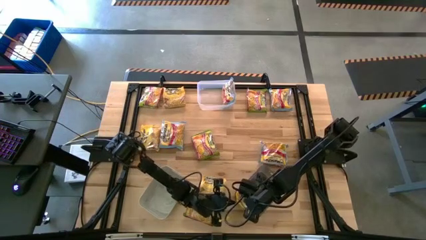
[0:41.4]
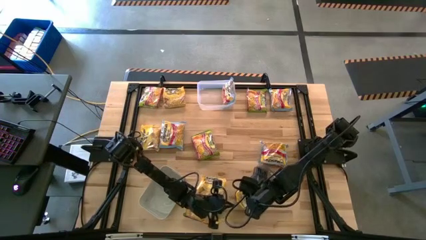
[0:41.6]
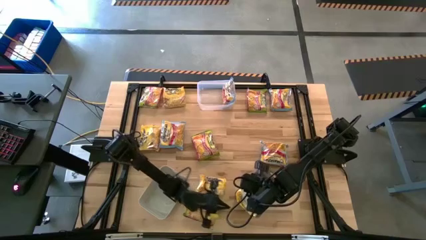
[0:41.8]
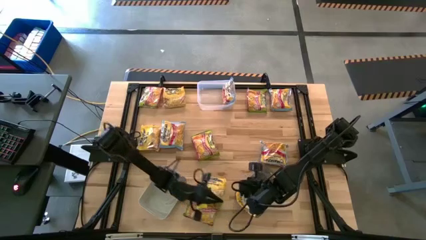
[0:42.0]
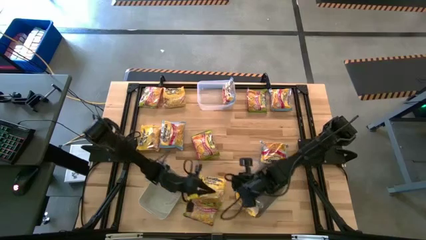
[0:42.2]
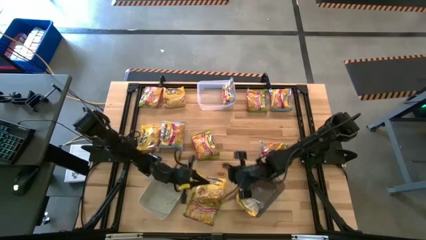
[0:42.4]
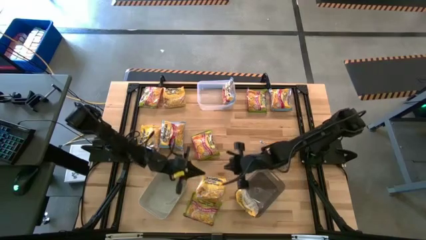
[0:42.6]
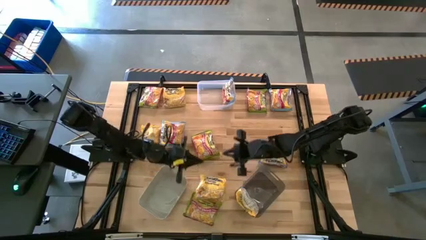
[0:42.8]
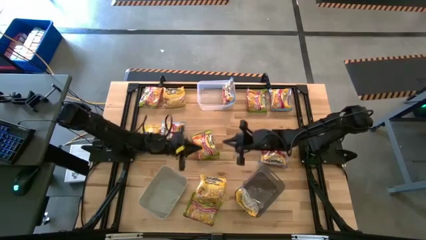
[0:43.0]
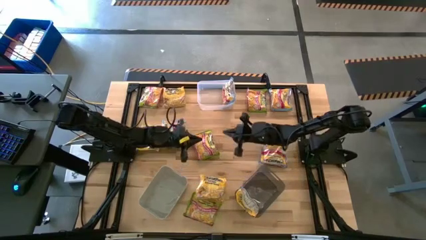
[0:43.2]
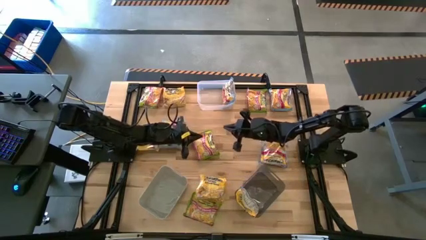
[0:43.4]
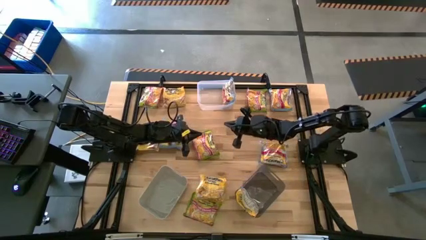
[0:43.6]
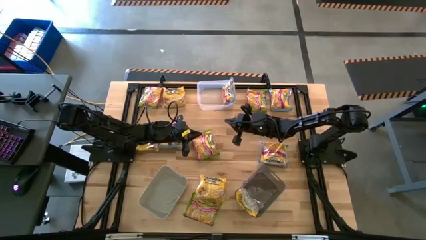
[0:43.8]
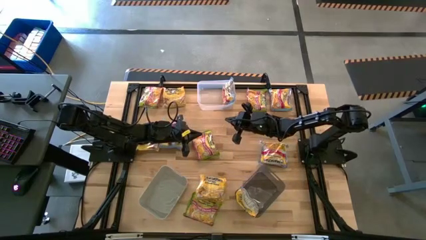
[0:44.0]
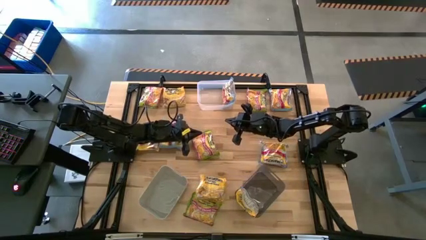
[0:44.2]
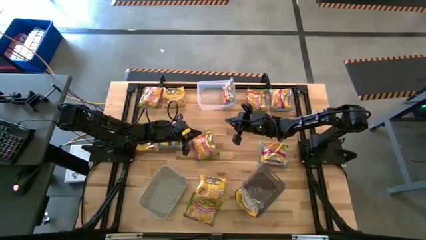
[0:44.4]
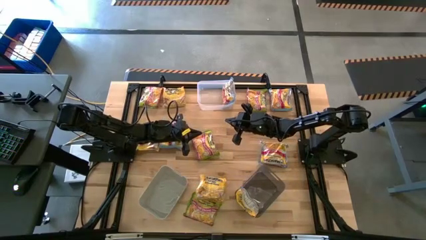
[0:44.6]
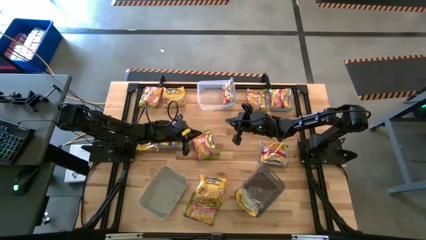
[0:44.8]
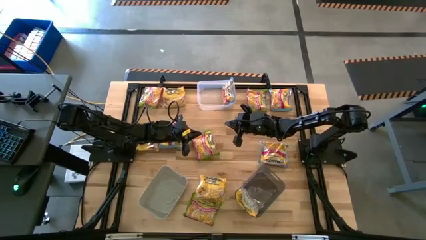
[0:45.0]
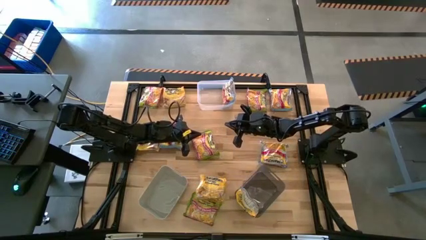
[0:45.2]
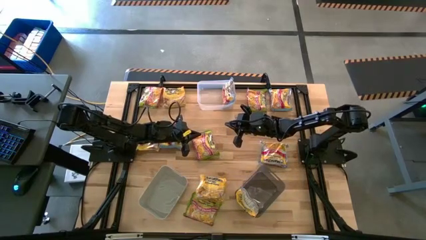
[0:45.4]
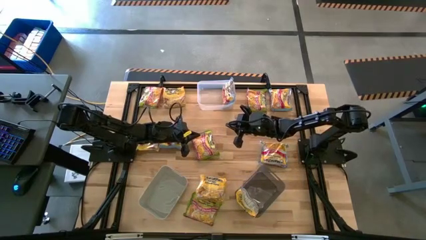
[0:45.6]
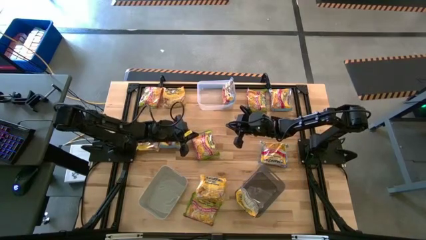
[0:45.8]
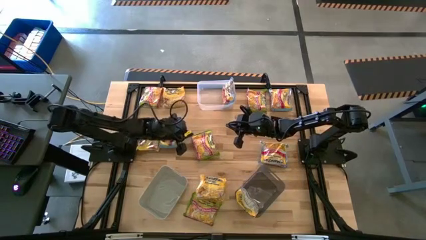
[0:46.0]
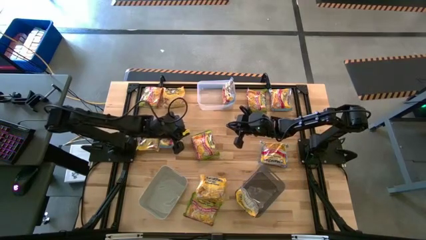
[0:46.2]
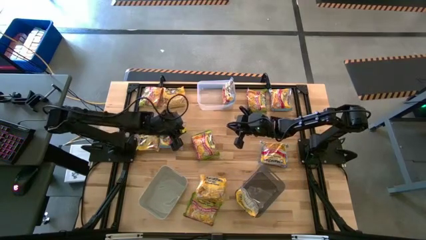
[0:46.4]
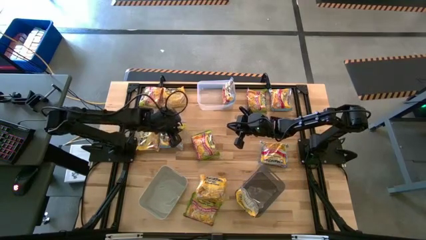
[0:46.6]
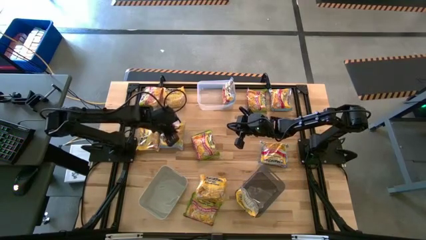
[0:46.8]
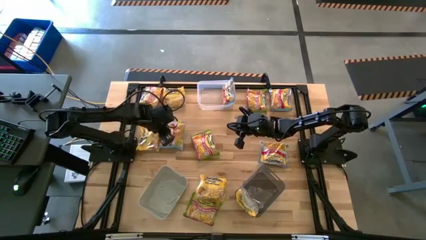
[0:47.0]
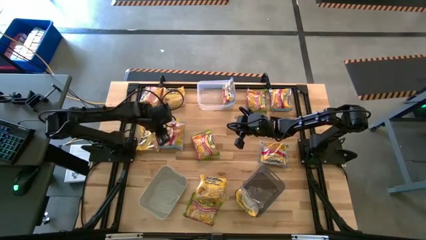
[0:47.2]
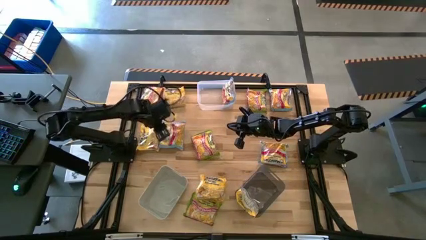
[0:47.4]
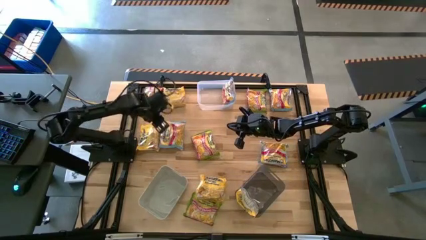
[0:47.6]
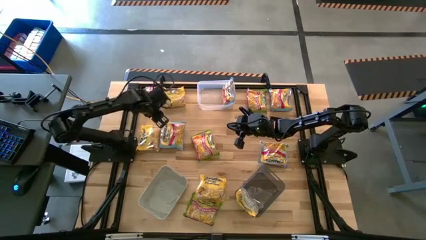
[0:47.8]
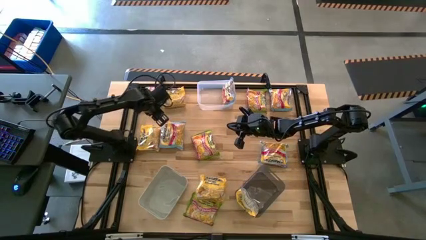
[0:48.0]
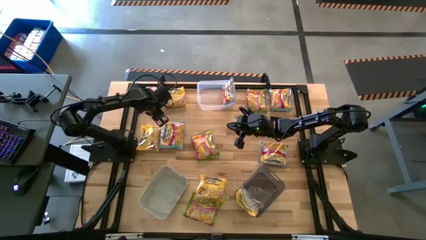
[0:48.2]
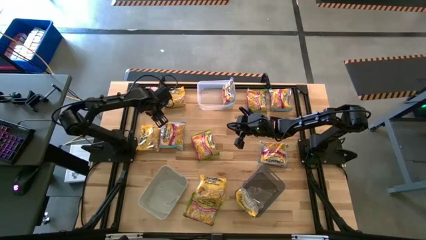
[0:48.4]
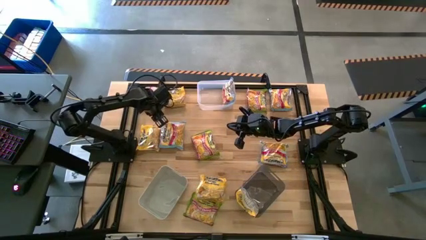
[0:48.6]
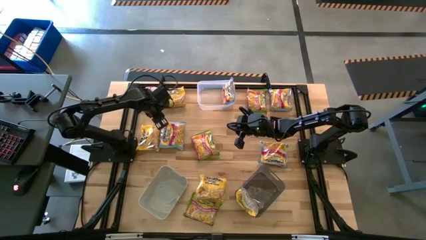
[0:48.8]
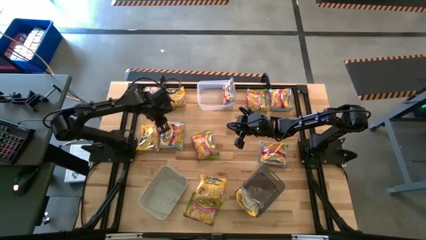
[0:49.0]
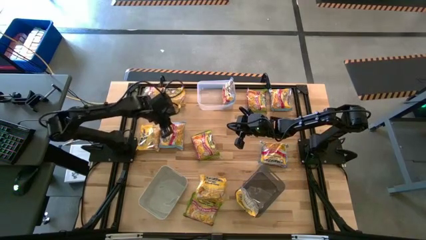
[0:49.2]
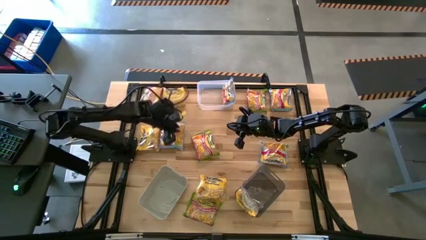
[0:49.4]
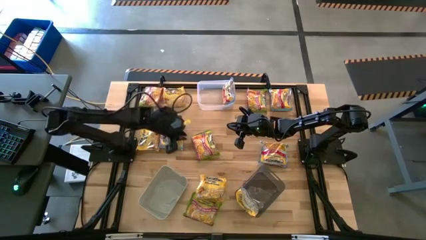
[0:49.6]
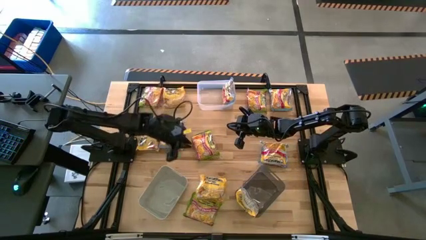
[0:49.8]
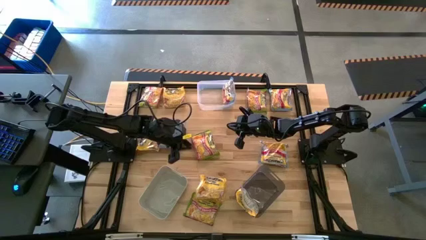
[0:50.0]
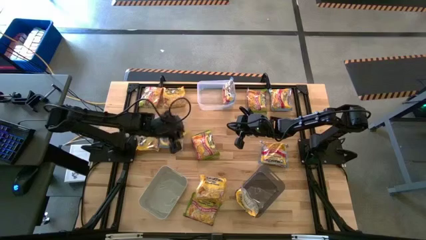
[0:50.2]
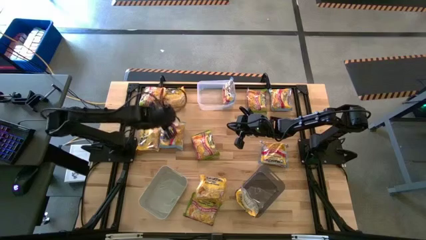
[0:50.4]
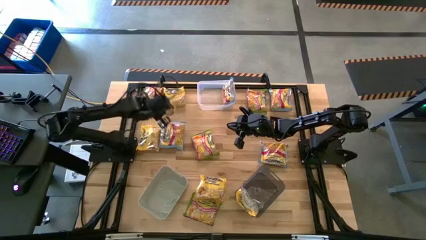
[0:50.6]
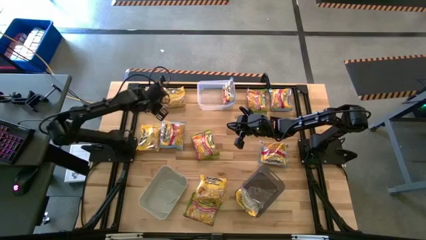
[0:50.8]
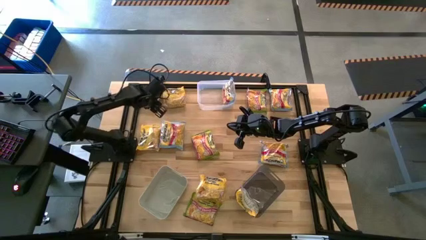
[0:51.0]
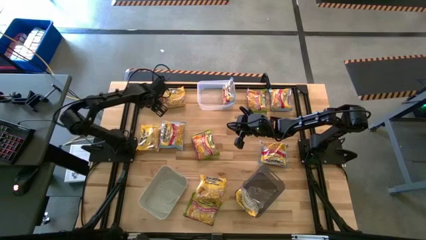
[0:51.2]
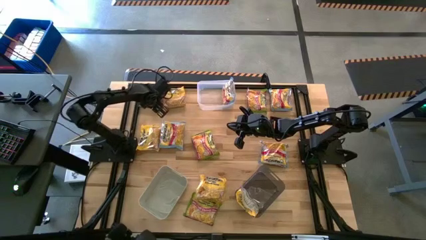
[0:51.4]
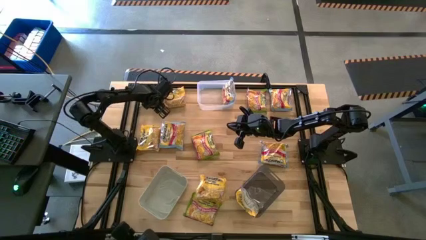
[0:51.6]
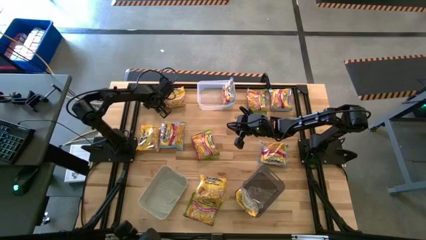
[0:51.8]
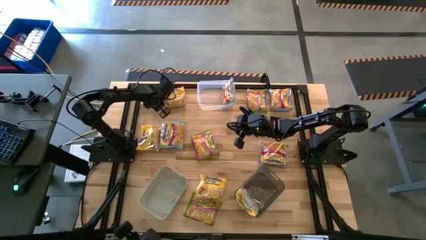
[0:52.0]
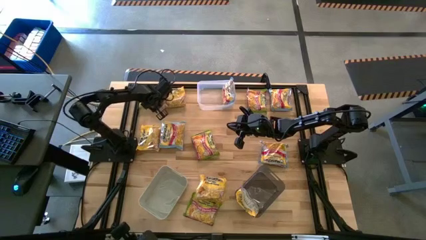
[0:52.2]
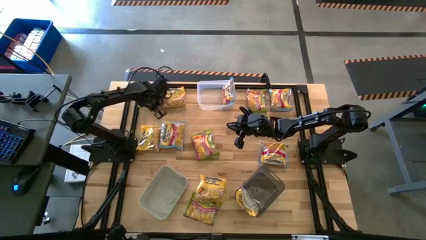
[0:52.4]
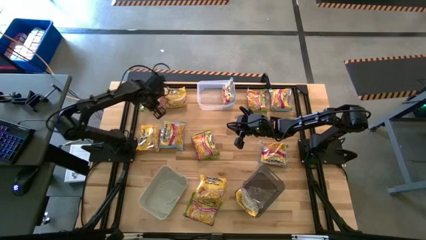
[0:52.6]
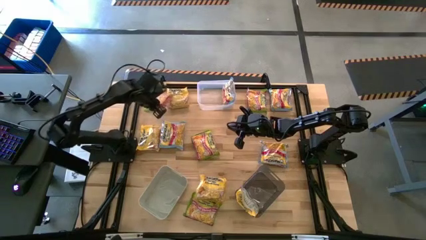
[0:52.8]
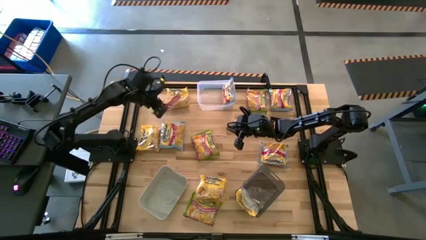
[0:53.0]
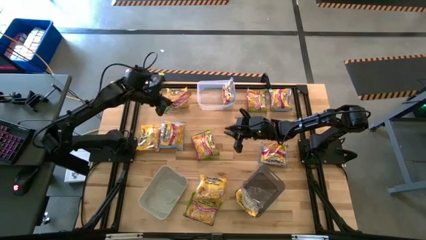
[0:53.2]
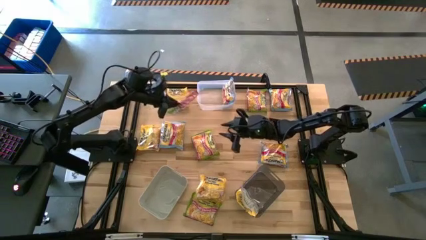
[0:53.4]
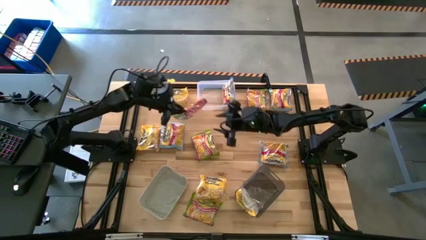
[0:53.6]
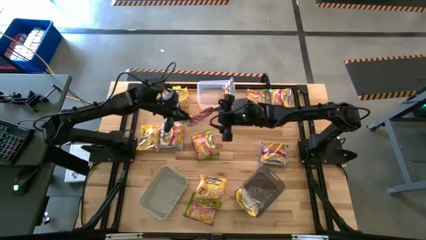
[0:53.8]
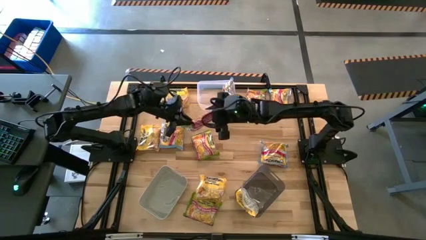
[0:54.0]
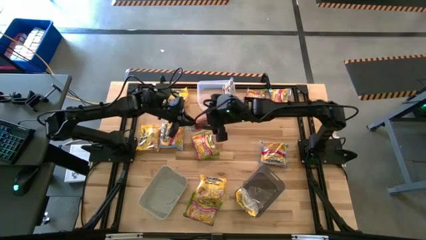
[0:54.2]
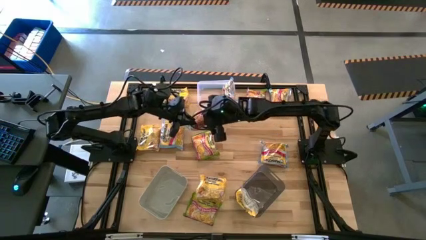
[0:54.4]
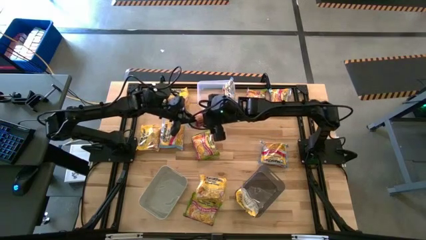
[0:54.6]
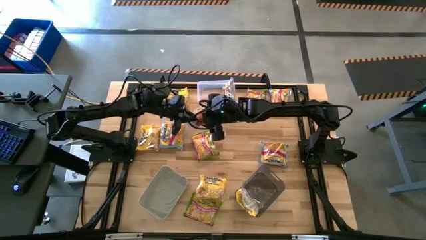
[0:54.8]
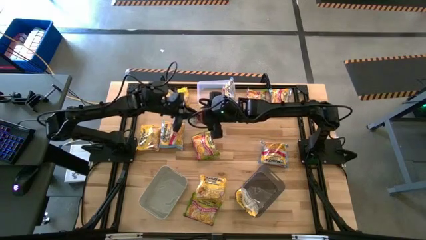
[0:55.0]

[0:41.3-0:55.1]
Task: Sort Maruchan noodles
Put the green noodle pack into the gray bin

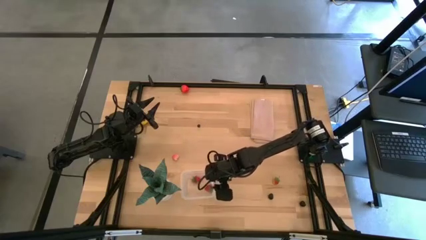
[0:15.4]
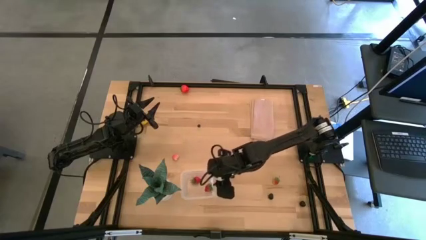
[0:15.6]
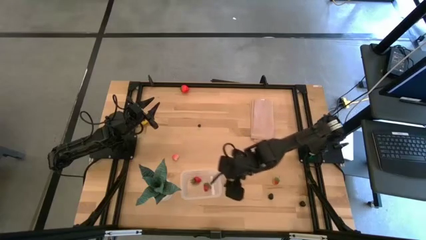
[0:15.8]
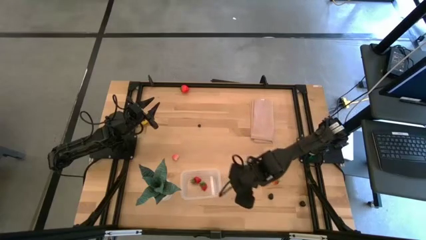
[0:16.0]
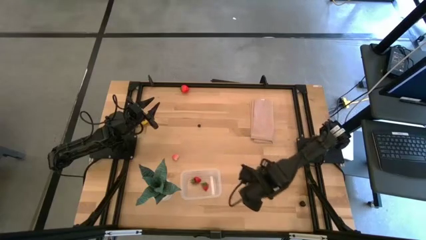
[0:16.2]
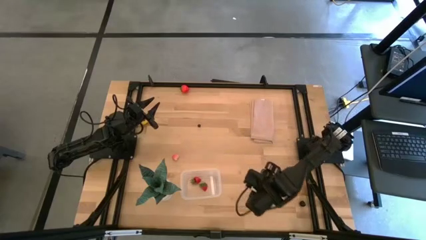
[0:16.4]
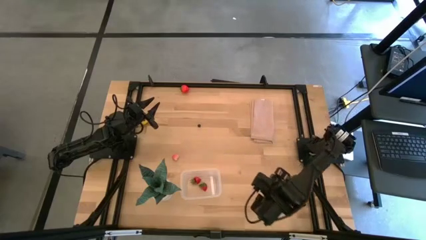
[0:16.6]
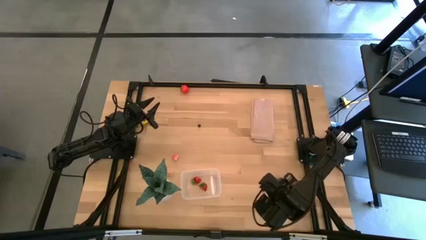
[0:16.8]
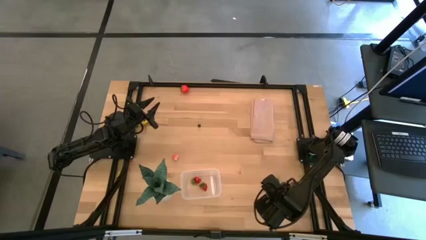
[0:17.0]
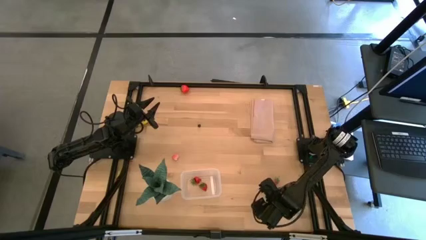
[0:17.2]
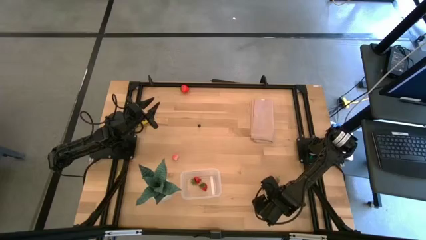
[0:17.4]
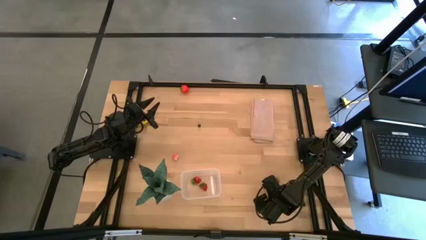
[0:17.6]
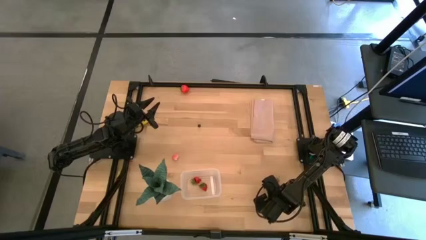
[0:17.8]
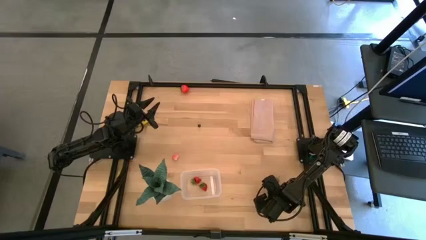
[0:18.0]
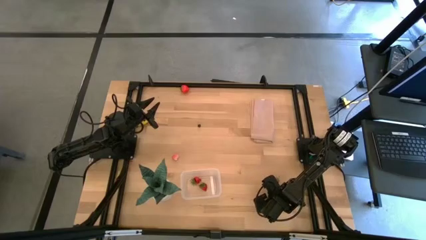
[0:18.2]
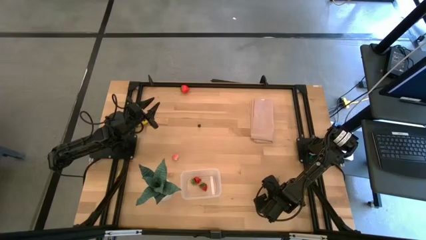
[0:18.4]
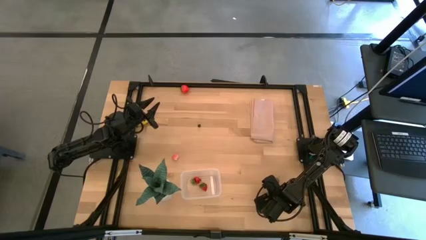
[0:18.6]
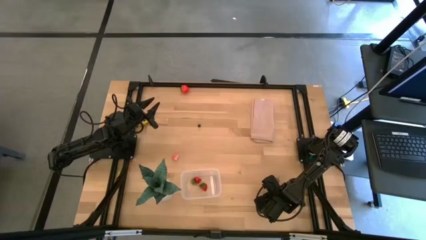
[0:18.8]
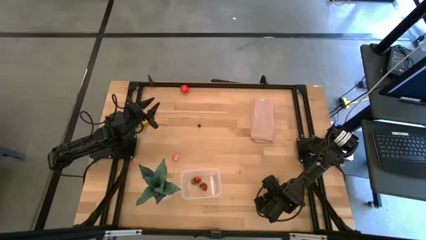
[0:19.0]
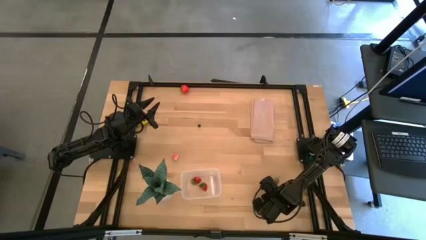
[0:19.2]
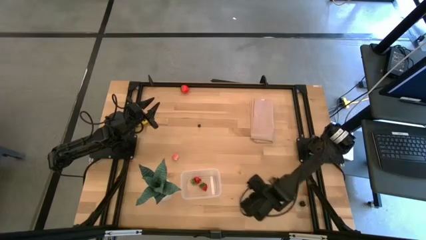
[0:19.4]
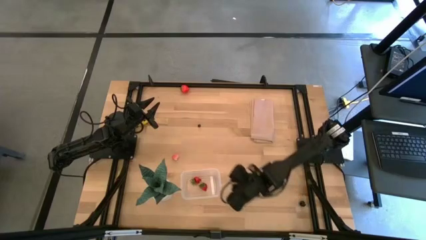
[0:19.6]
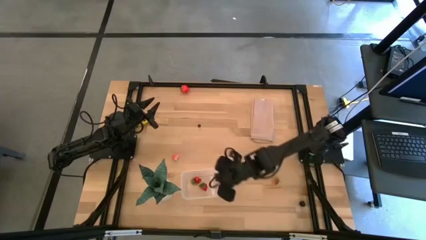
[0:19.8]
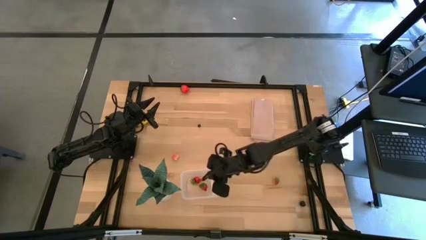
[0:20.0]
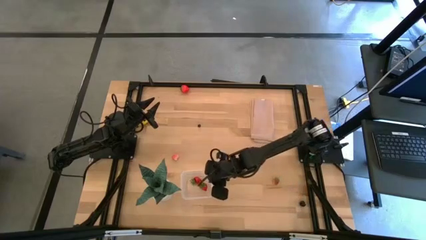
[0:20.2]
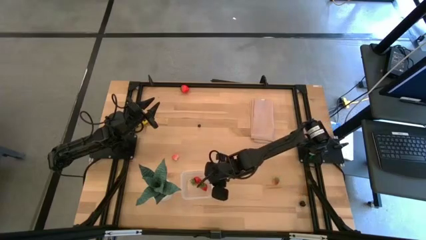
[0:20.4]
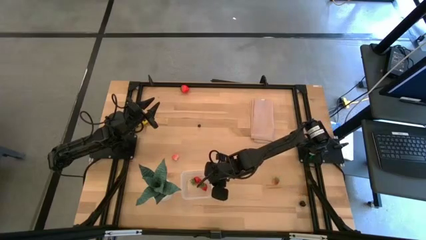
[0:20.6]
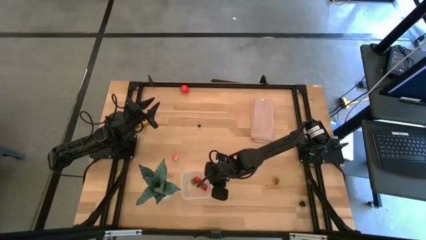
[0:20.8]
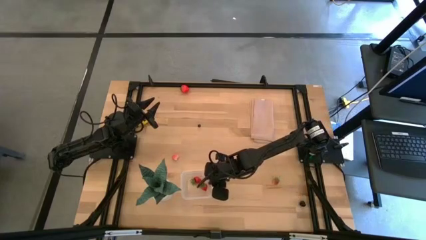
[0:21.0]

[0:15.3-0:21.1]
Task: Pick and placing Produce into tupperware
Put the left black raspberry into the transparent bin
